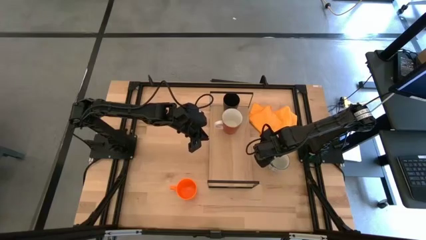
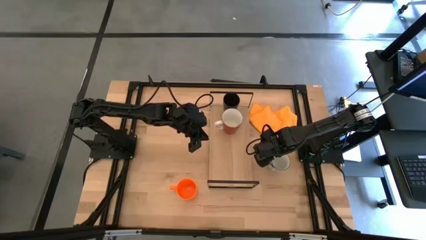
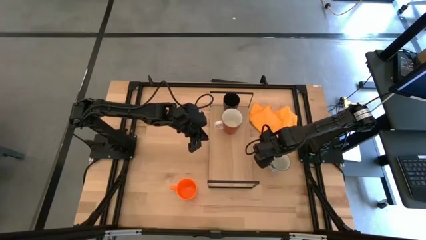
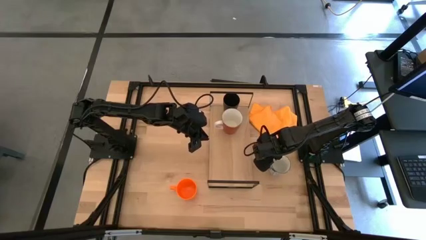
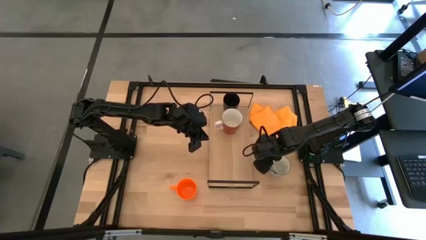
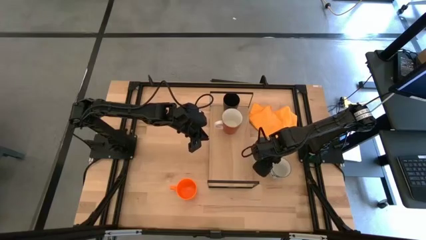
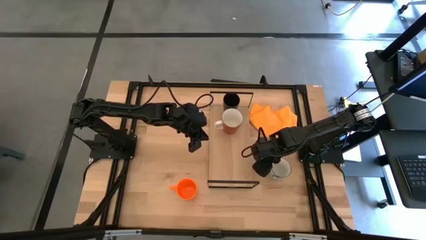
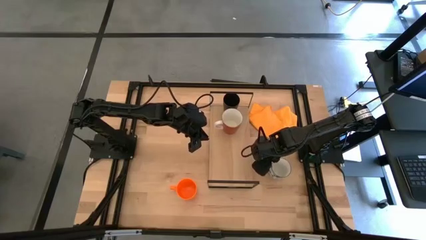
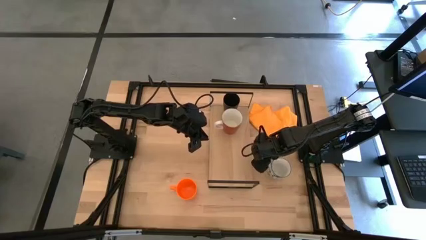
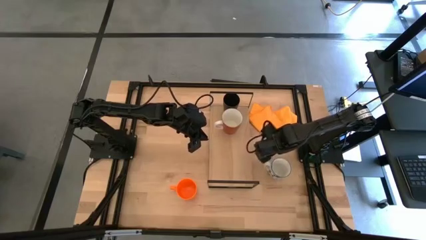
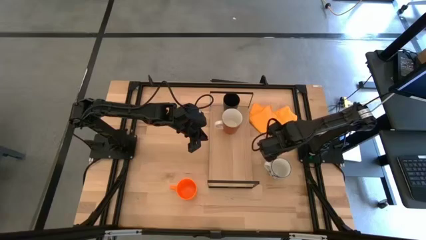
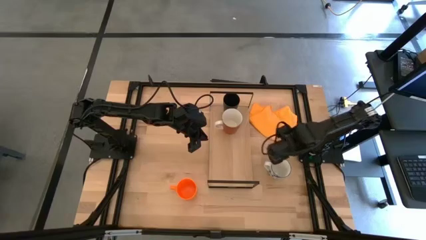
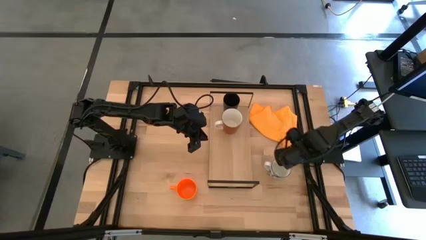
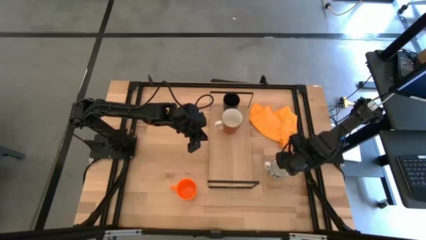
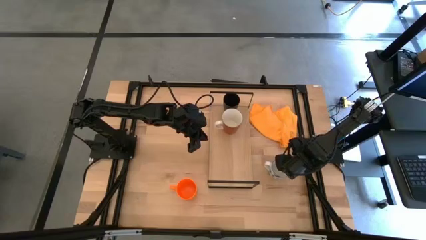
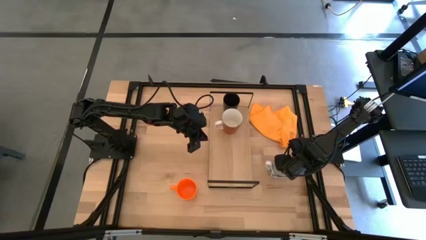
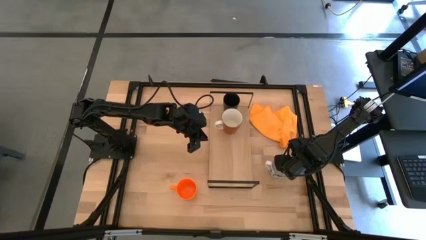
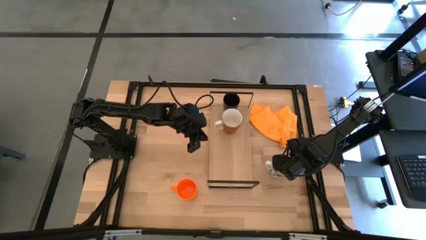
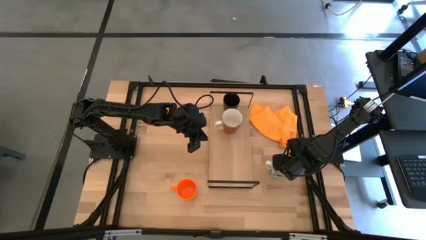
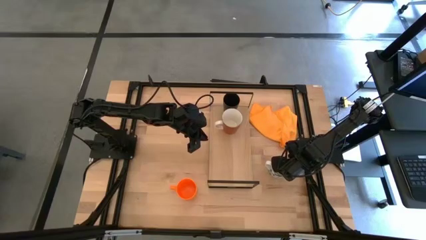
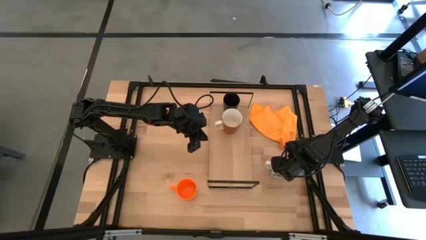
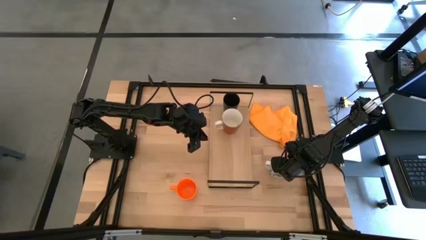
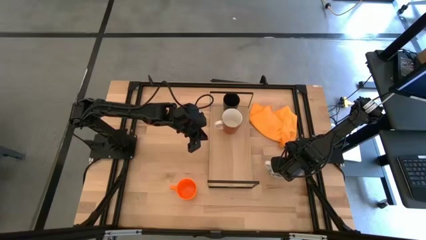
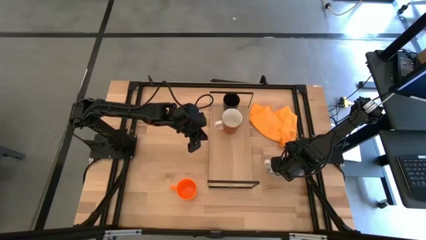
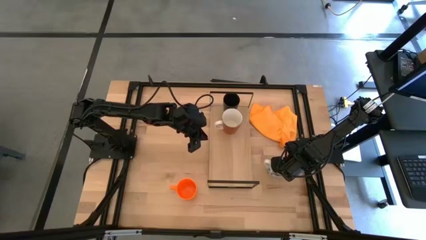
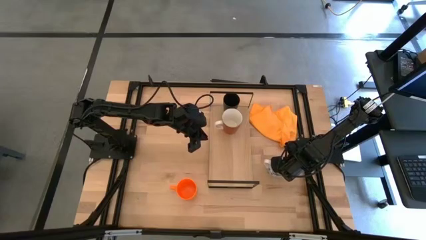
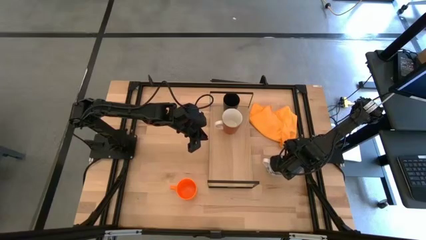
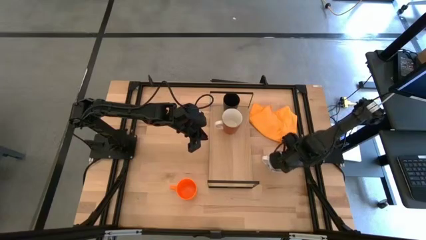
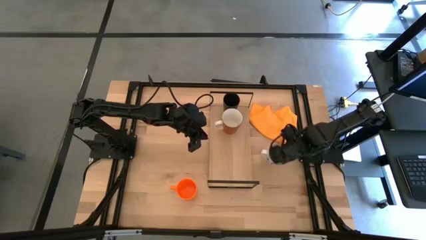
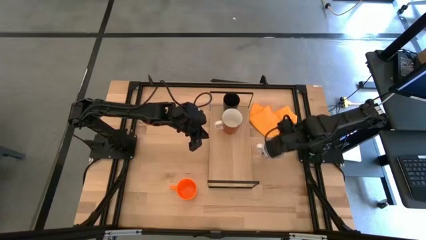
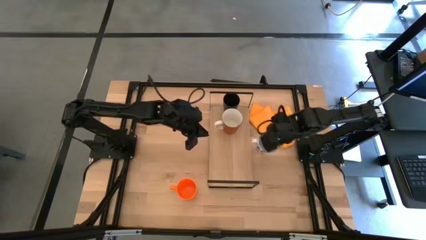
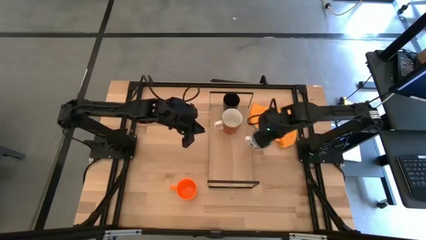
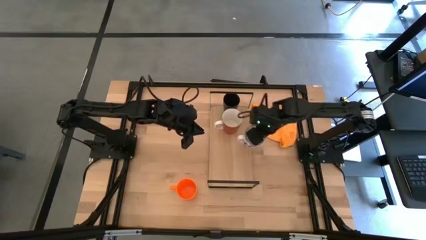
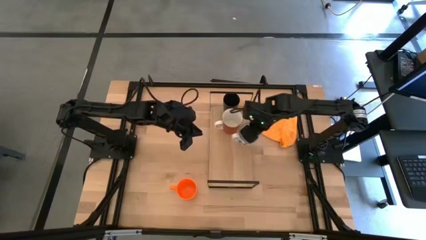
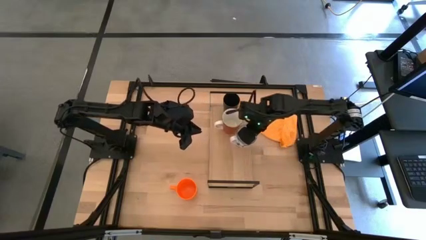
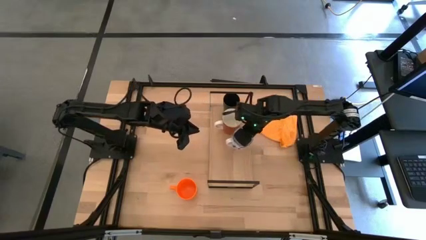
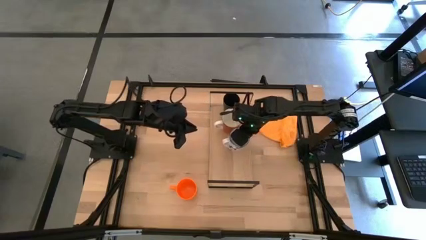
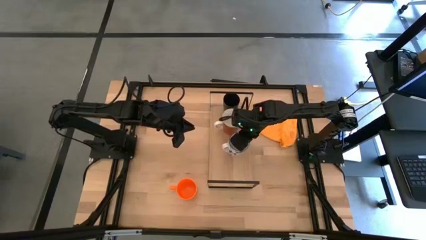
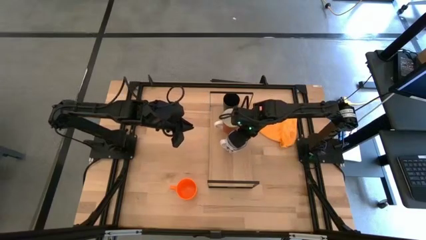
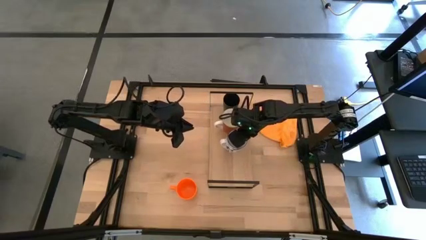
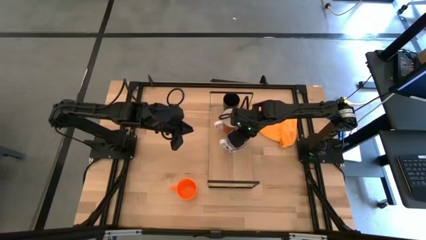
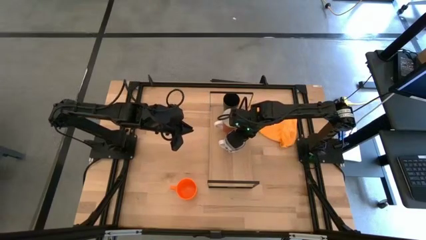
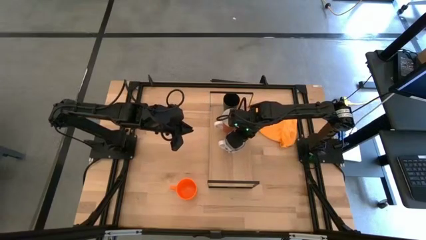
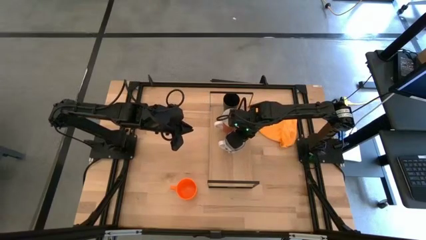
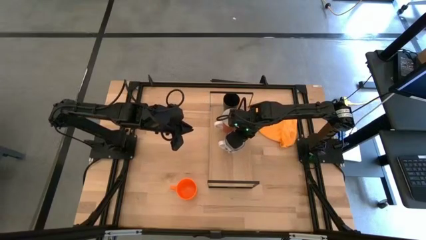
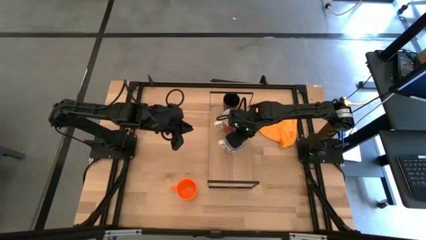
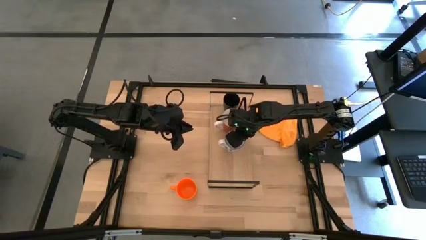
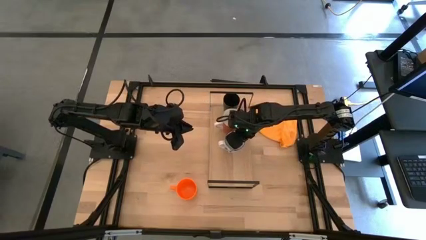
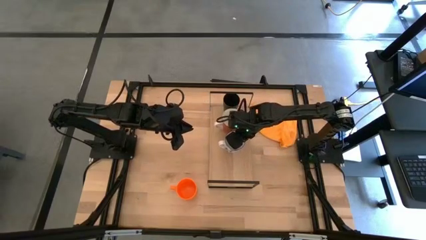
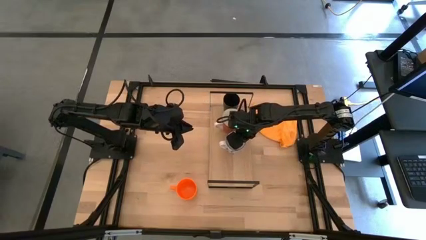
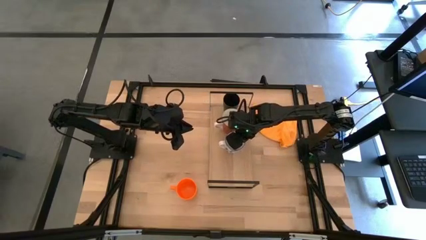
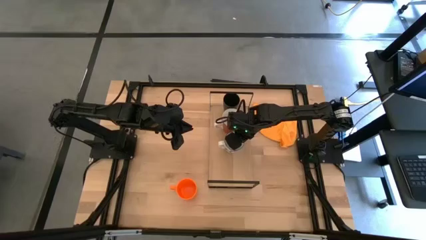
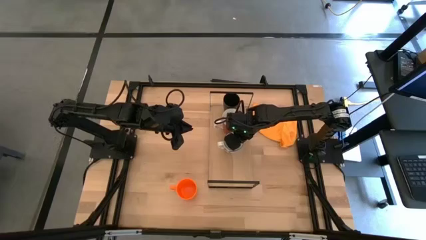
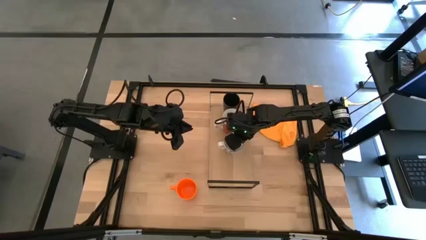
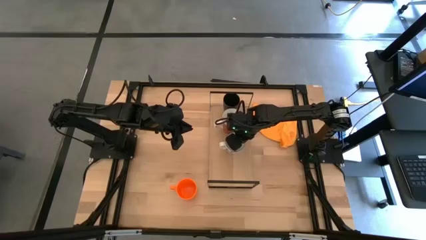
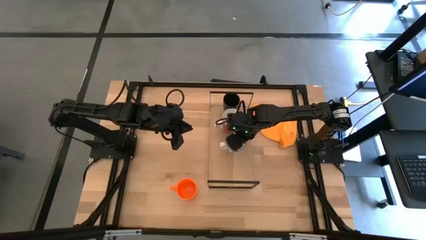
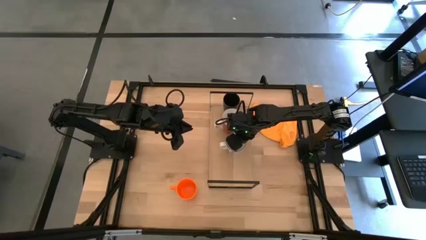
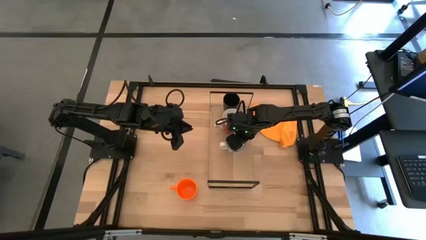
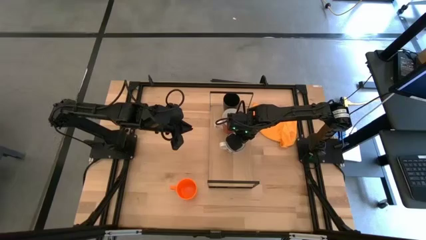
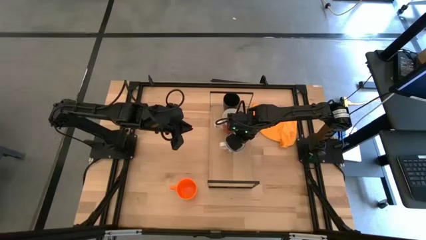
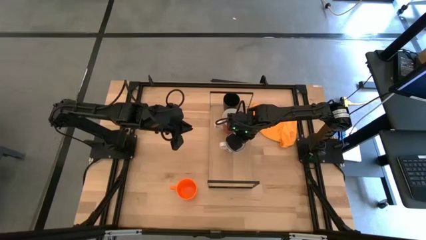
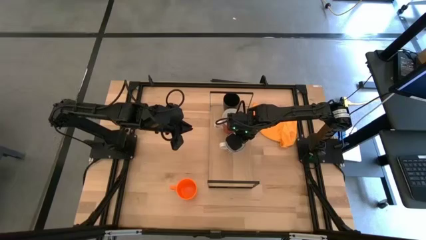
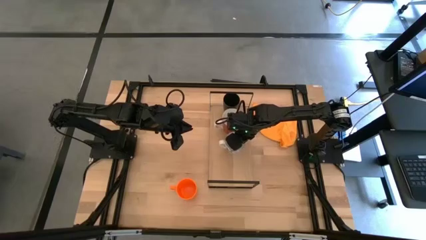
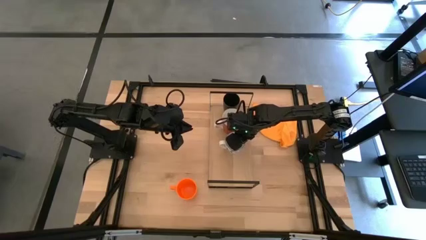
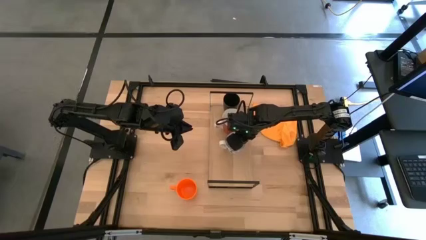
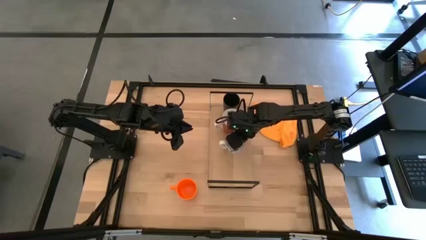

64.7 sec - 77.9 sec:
Task: Stack small to large cups/mugs on shelf
Put the blue pattern mug align with the red pattern cup on the shelf

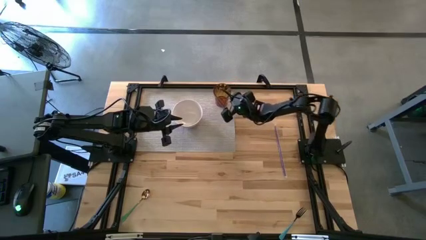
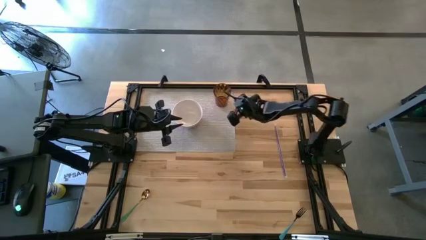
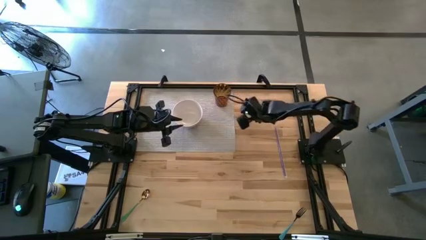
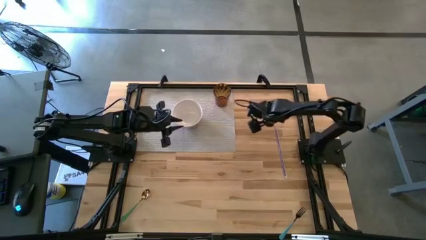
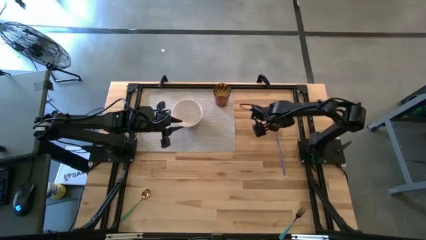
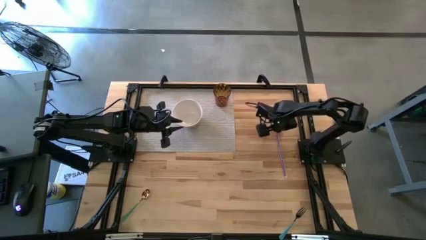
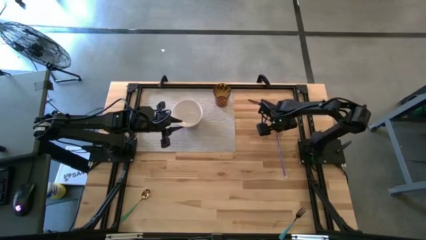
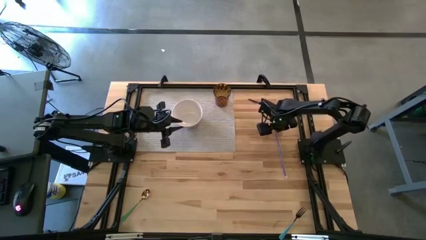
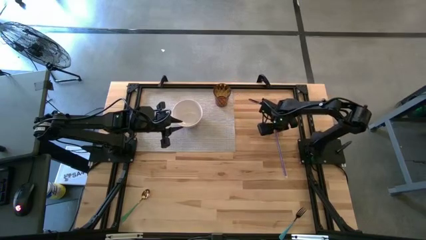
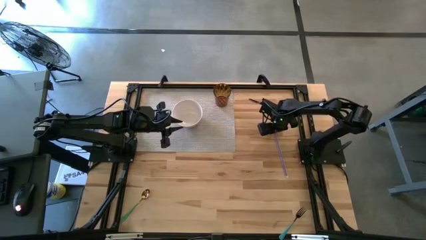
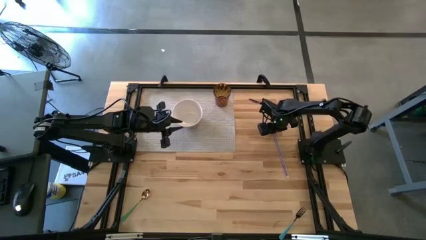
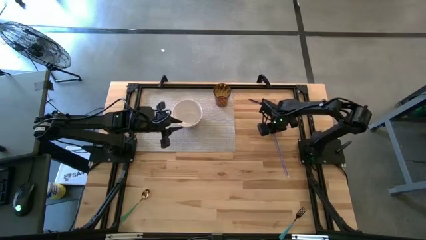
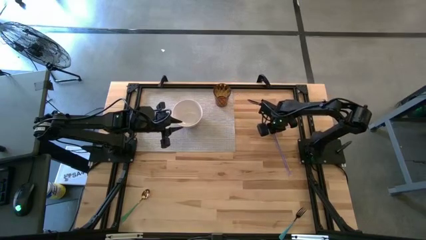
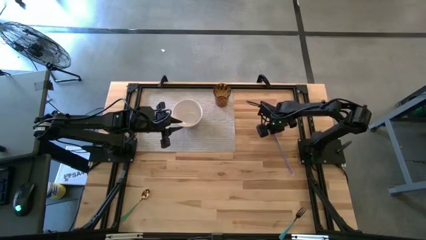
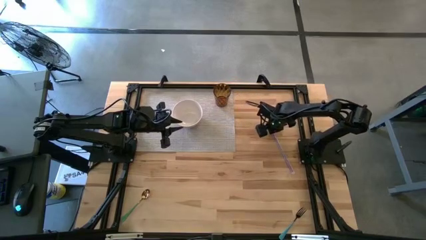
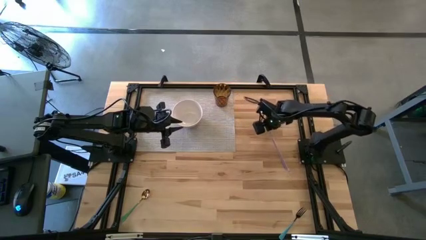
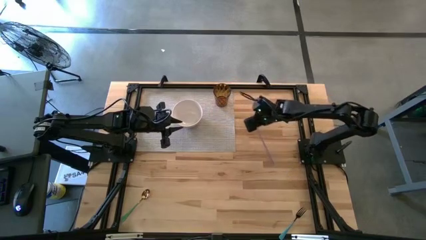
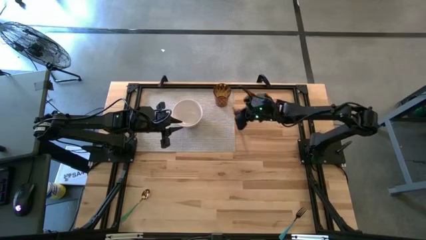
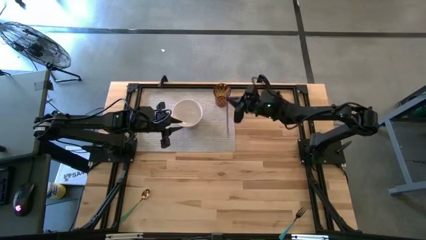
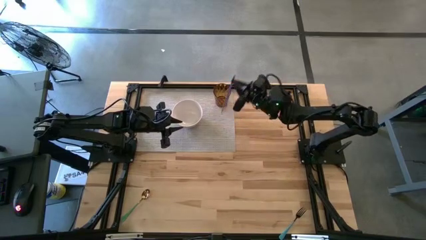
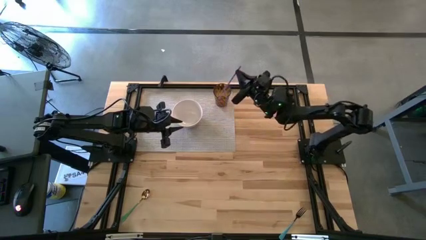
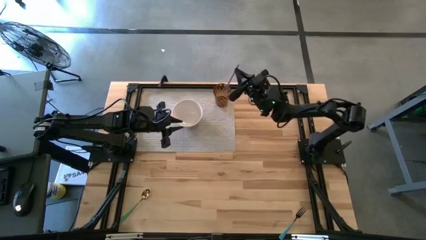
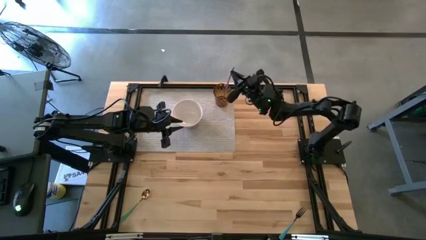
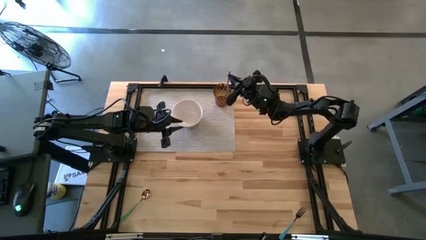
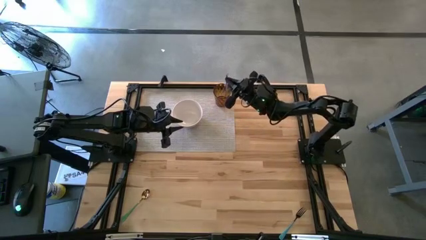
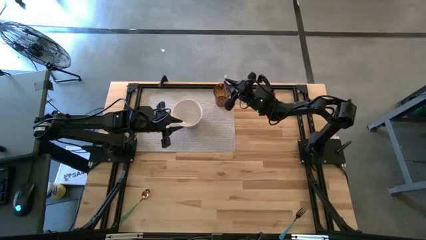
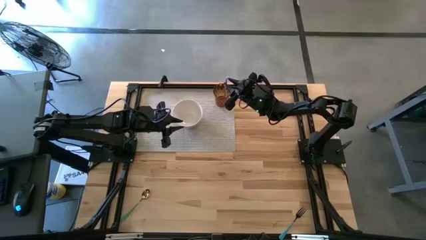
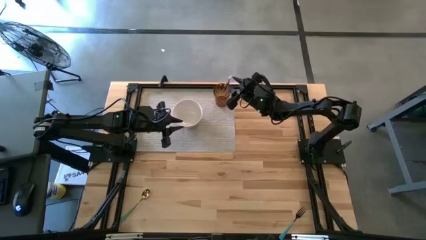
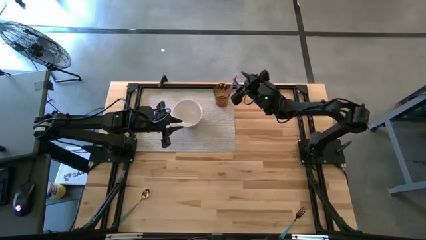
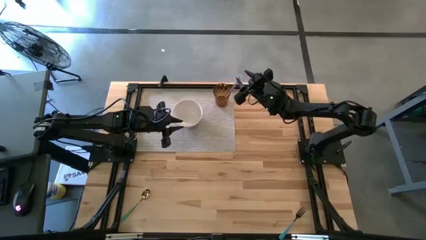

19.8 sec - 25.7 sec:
Task: Pick & Place Utensil
Put the purple straw into the brown cup
